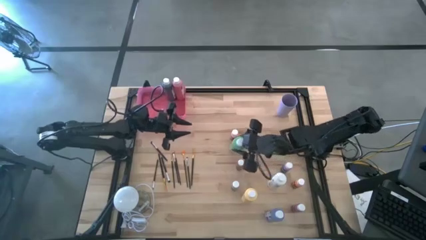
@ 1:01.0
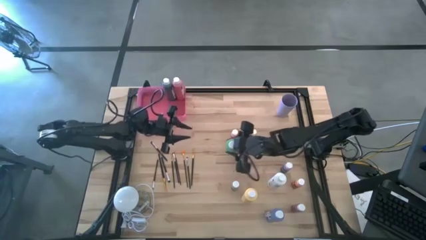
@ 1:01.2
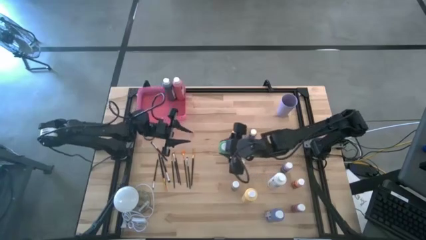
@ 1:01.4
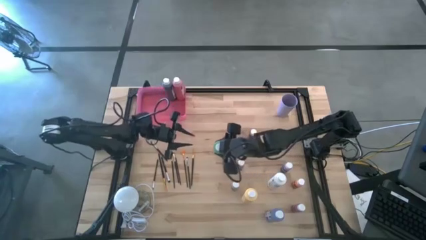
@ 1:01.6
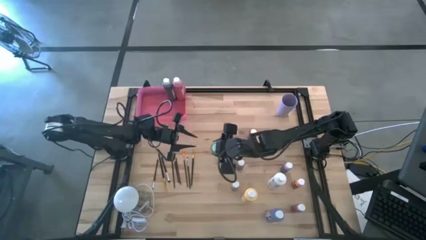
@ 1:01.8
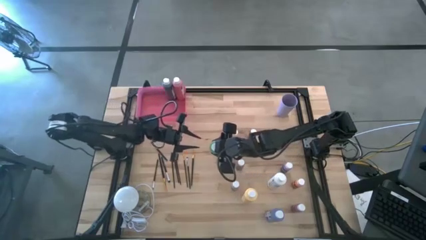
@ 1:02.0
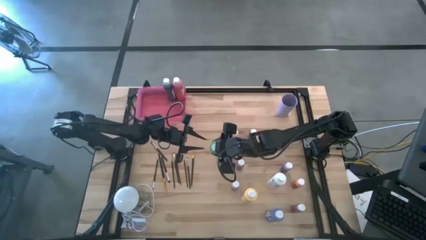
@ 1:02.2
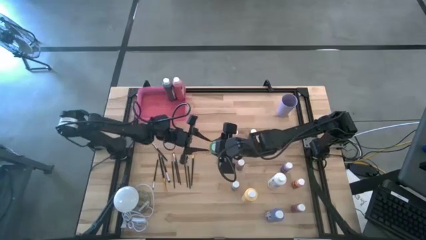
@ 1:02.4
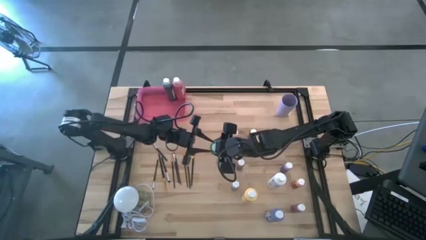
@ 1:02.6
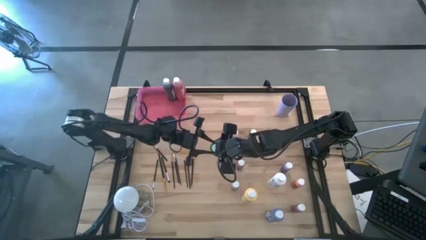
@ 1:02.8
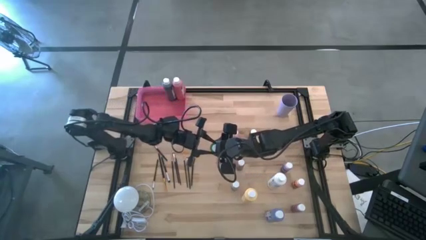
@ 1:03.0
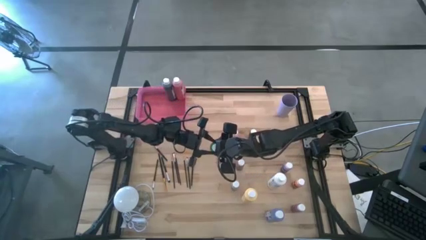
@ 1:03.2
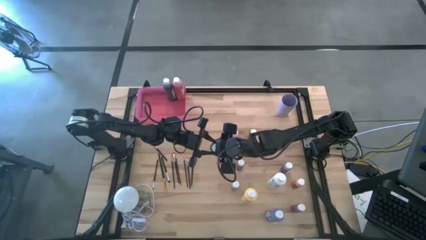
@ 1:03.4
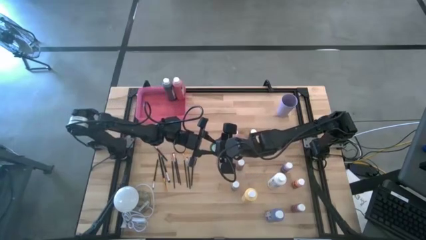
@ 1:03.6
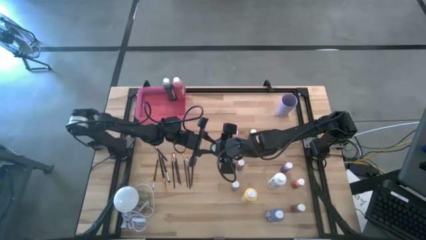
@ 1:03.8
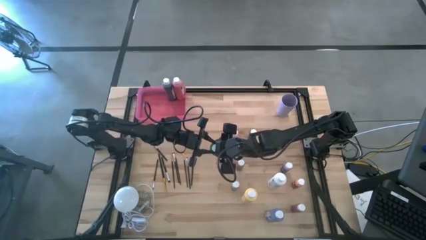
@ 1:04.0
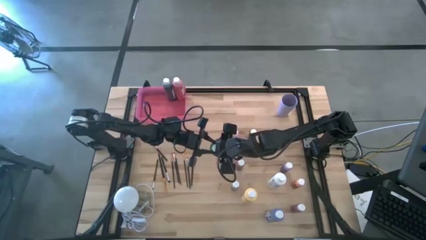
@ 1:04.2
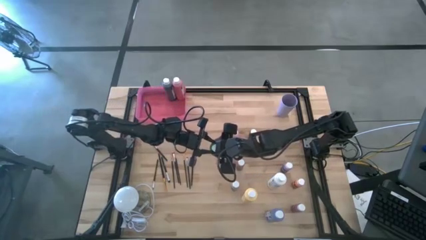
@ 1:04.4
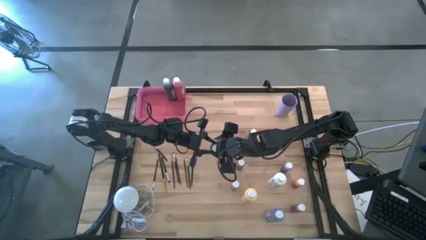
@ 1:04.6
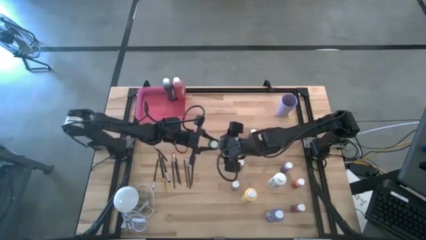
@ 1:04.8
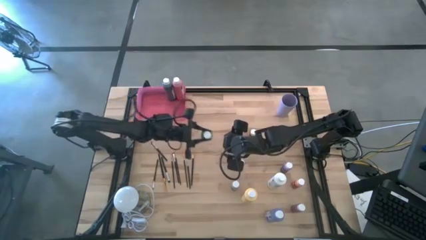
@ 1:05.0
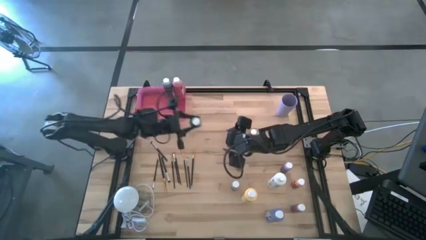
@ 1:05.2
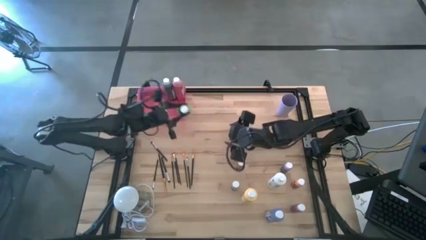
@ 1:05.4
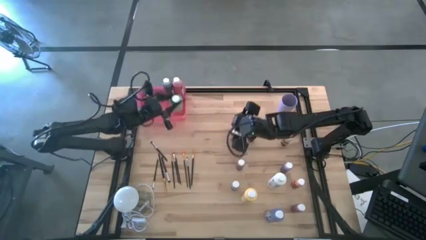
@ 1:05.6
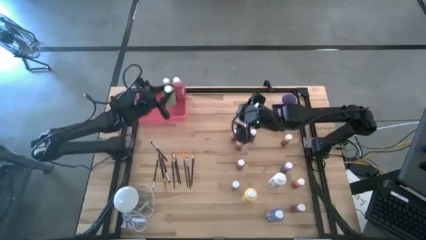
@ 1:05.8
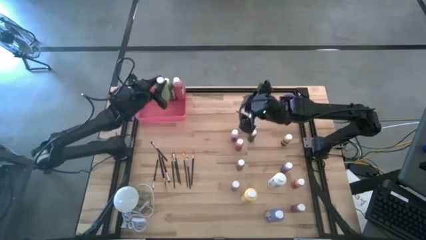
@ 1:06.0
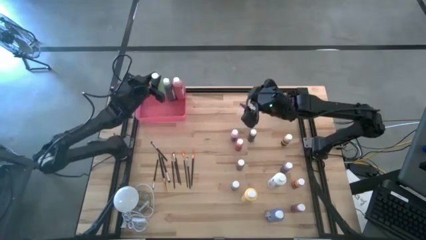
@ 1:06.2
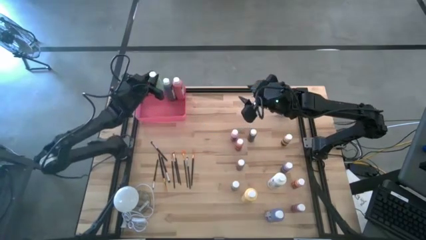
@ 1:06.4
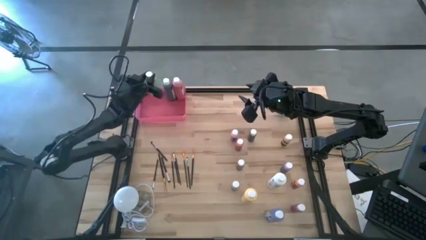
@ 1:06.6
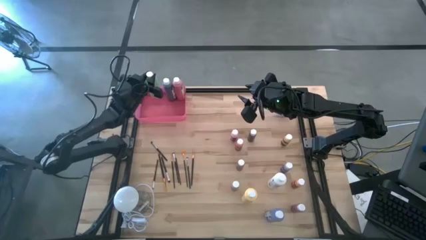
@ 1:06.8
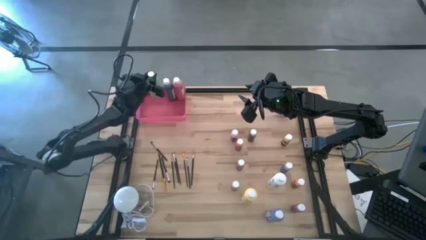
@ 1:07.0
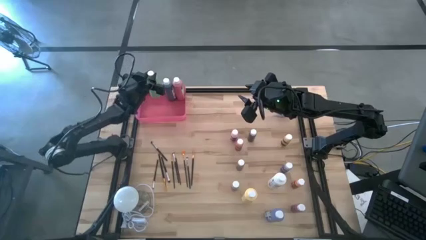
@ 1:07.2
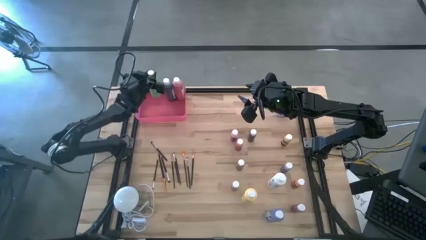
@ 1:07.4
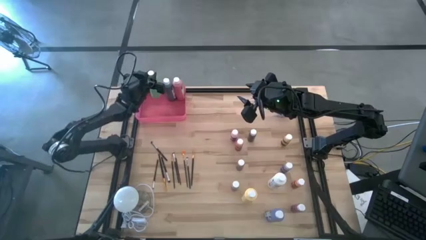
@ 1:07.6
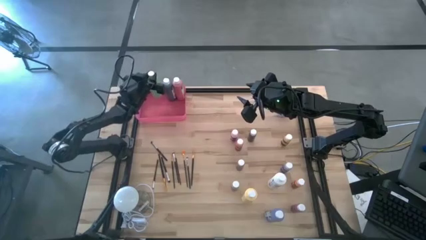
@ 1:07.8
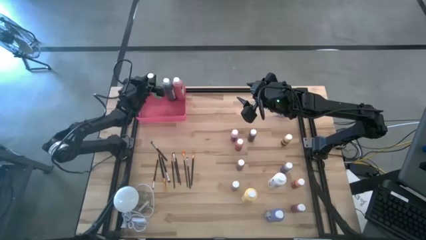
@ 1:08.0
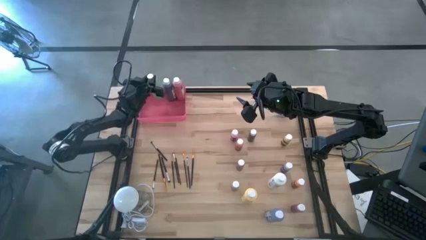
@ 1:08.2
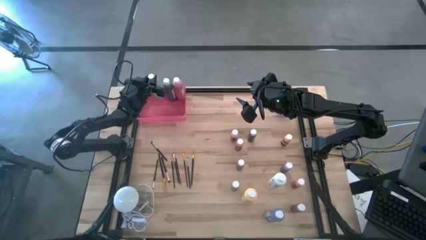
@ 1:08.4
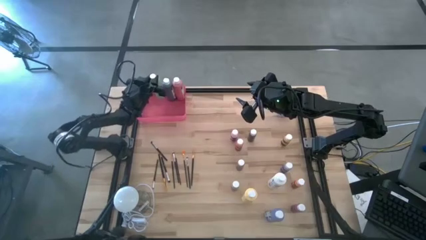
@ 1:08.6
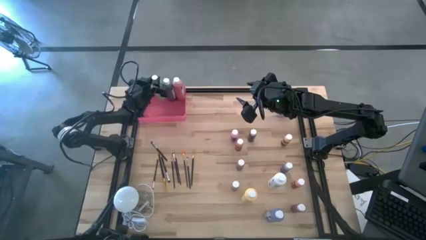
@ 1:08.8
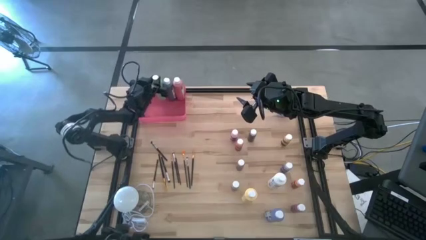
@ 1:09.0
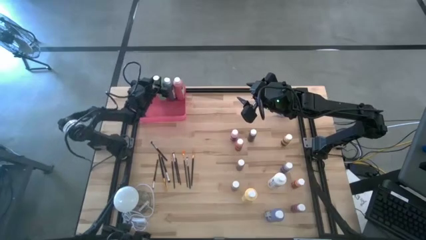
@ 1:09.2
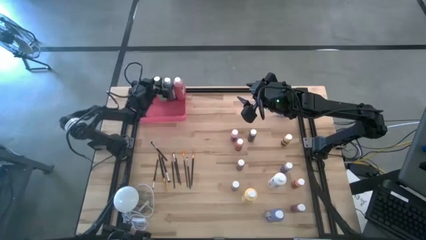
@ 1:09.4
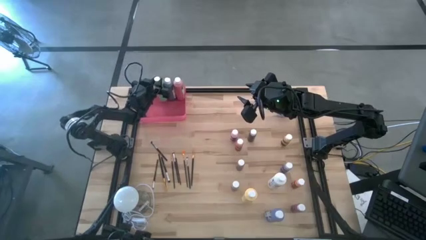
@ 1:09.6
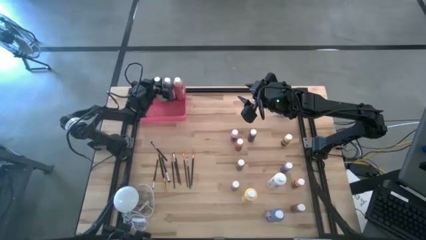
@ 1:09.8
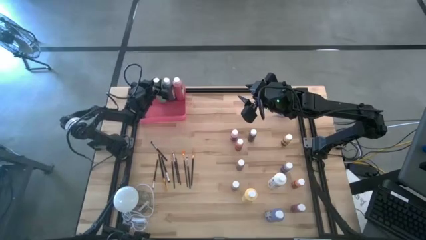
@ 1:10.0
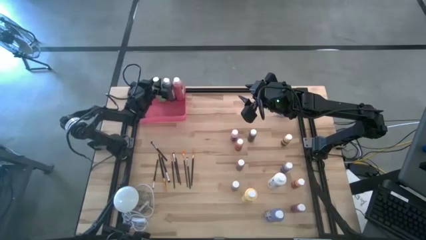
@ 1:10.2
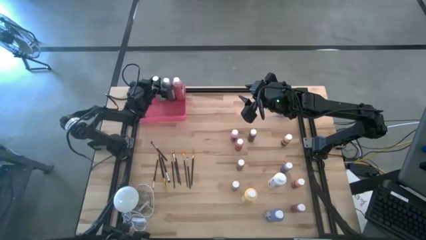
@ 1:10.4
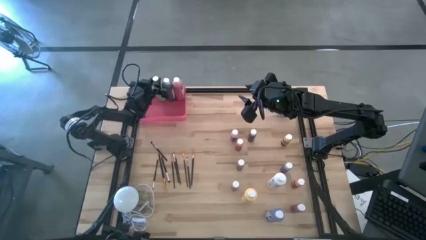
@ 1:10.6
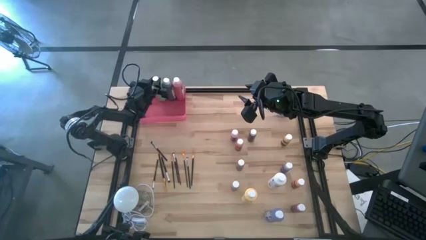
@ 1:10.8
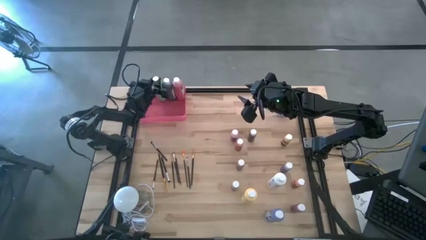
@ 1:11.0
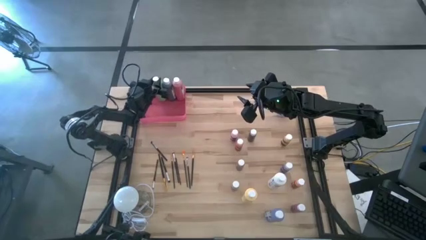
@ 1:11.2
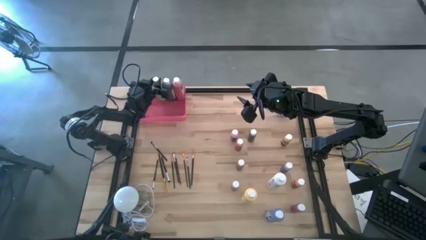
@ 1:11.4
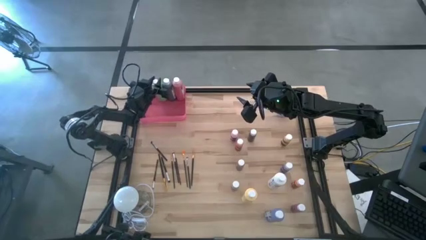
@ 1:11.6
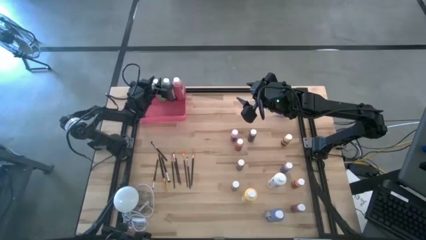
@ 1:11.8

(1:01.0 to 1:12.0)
Task: Pick & Place Paint Supplies
Put the large green paint bottle into the pink bin

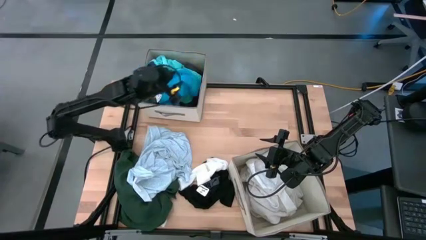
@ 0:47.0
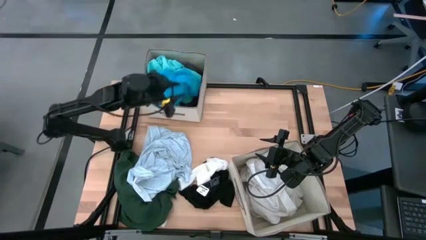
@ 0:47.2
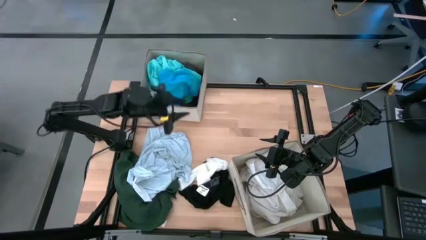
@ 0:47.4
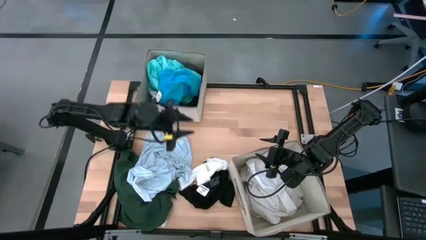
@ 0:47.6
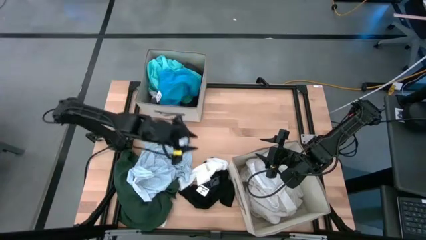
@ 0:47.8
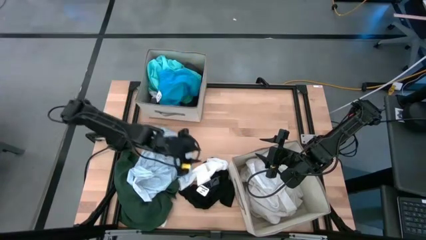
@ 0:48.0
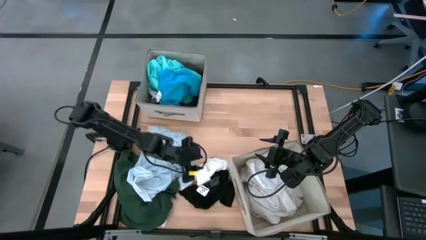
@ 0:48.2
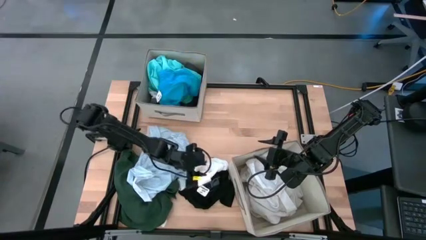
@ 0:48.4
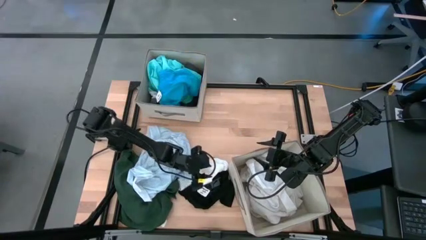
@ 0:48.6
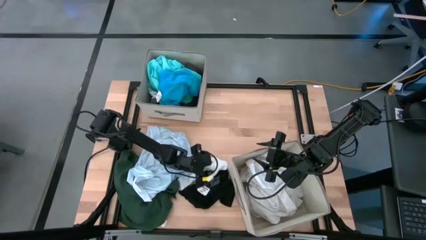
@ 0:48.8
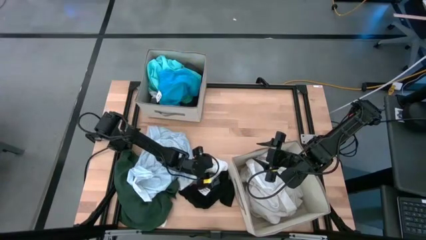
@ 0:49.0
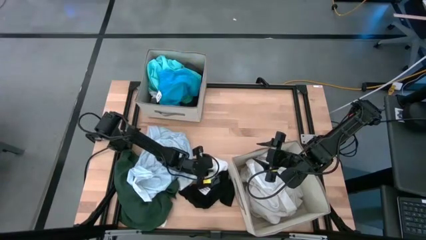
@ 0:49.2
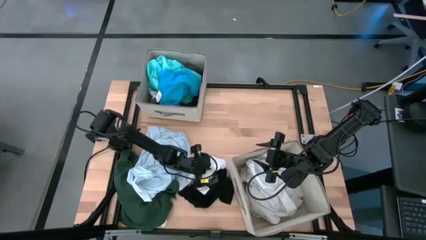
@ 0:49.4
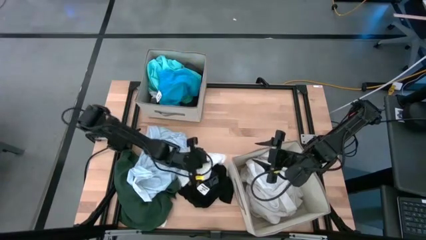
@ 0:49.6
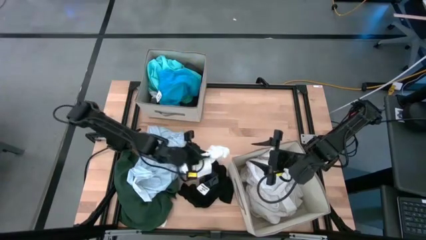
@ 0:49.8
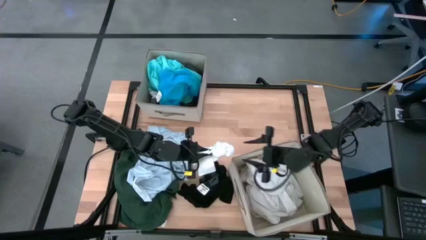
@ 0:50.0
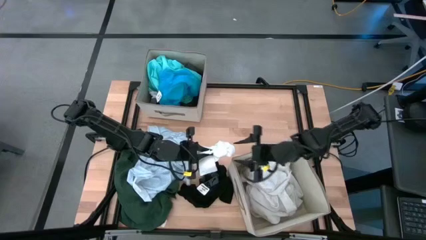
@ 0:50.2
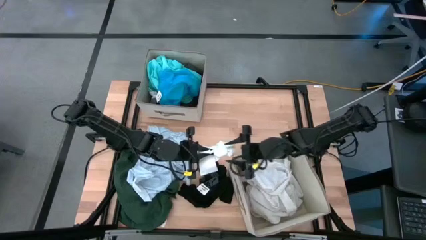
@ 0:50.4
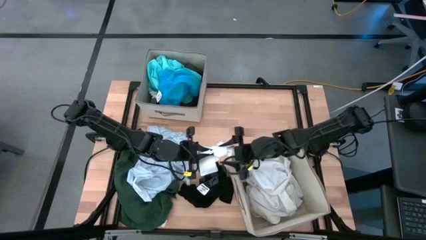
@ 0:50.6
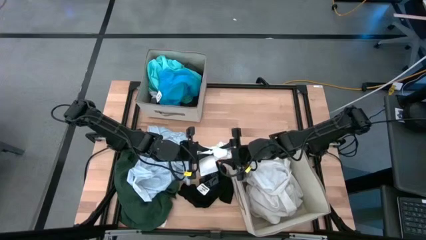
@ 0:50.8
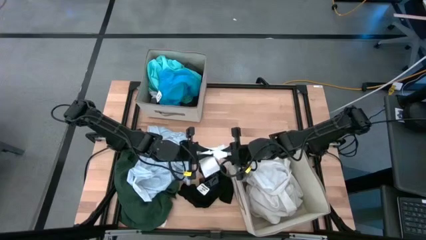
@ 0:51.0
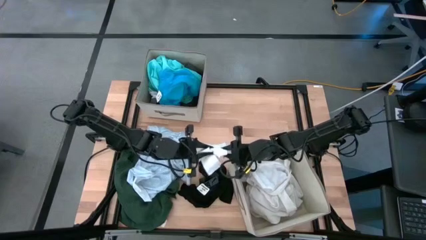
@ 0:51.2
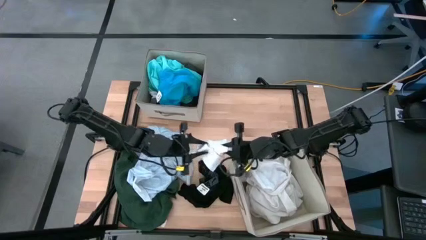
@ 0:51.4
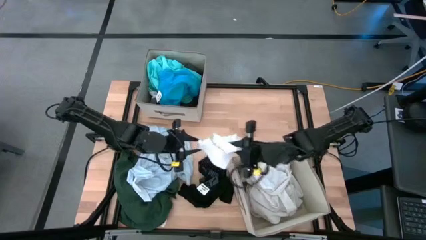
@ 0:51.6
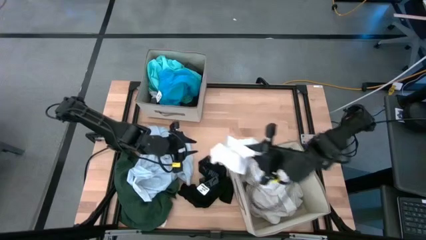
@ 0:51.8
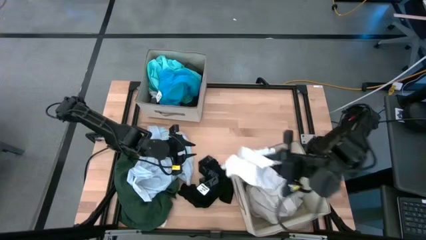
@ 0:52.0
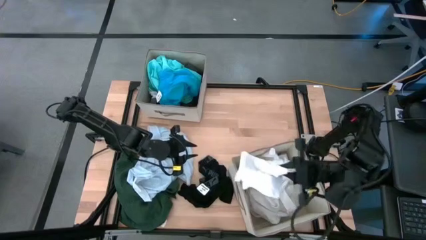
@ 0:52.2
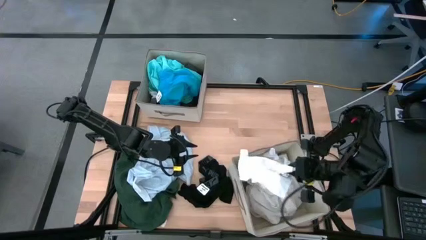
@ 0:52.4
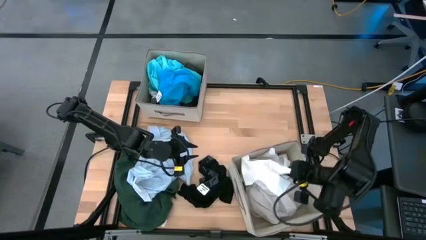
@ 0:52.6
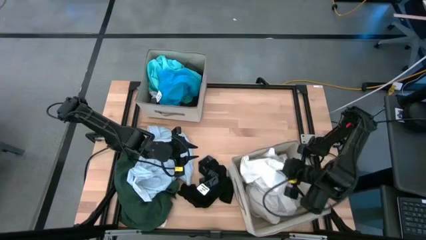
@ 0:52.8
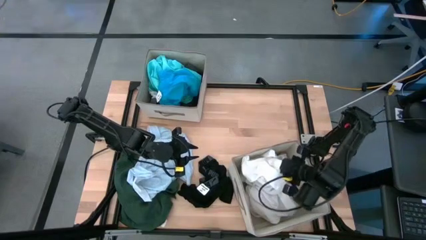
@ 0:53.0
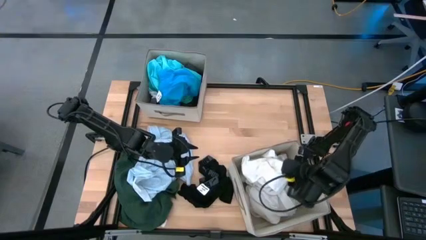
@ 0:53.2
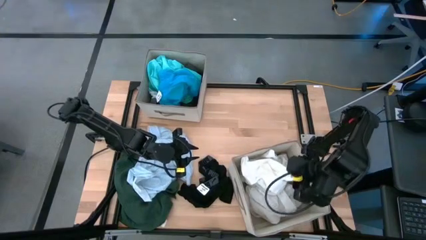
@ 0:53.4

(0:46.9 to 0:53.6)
Task: Sort clothes
Put the white underwear into the bottom white laundry bin
